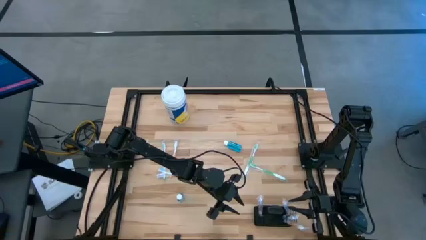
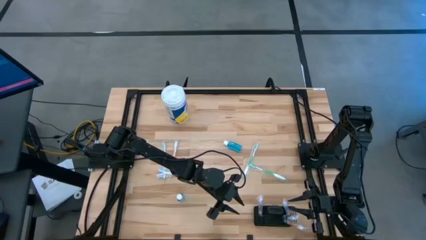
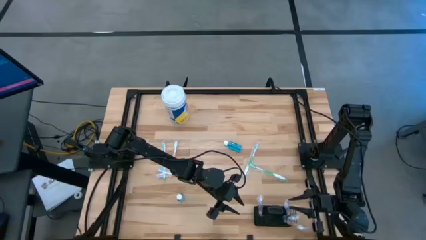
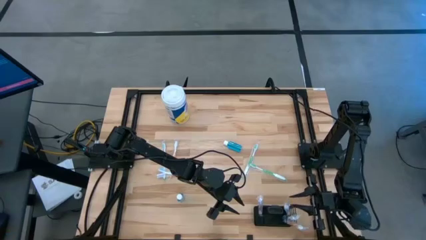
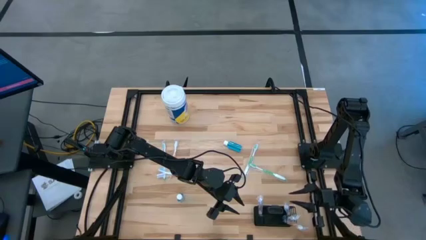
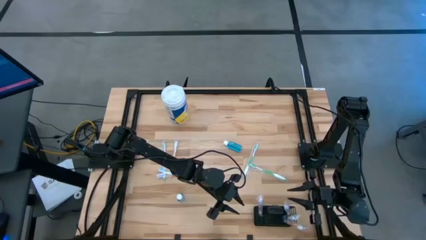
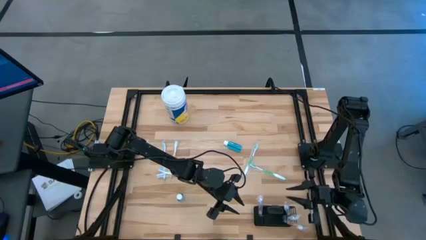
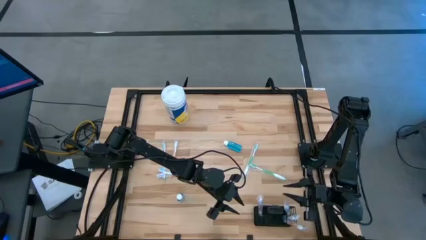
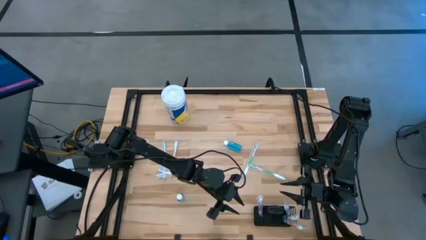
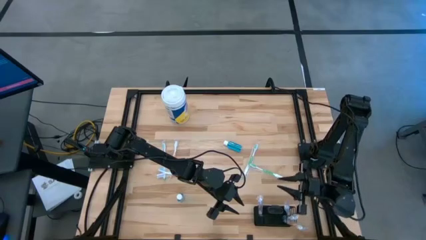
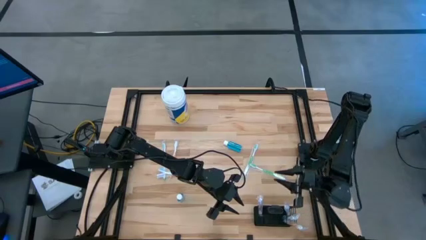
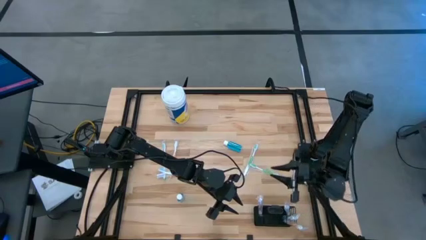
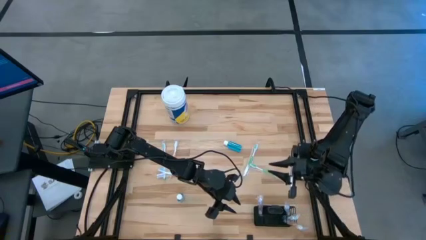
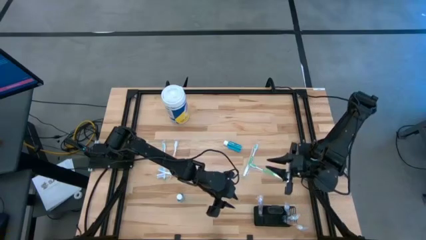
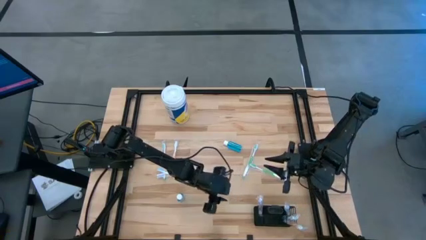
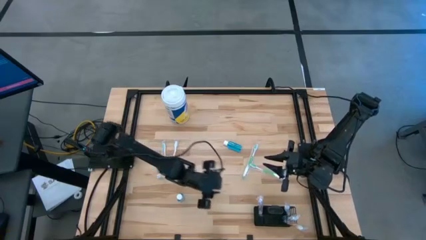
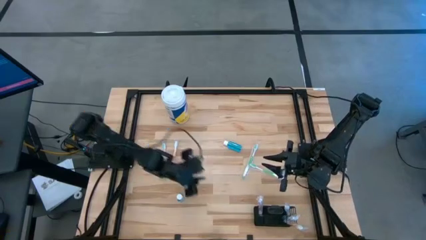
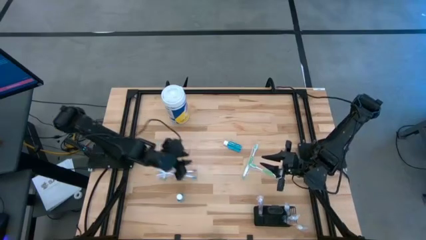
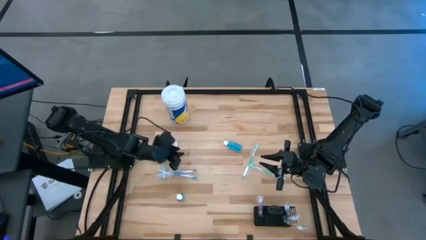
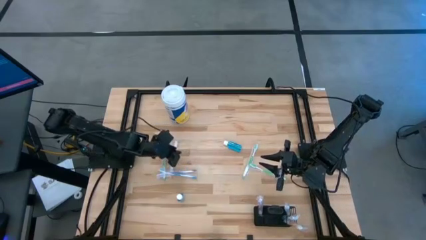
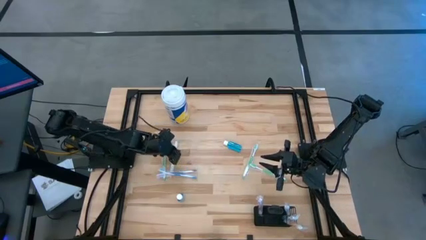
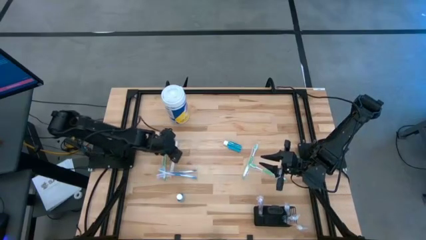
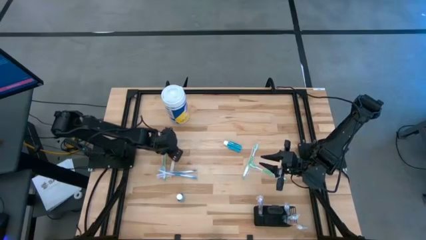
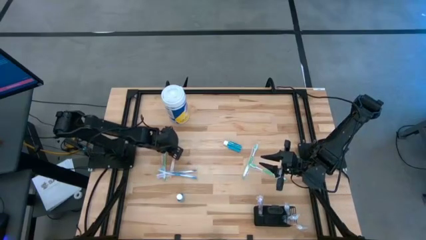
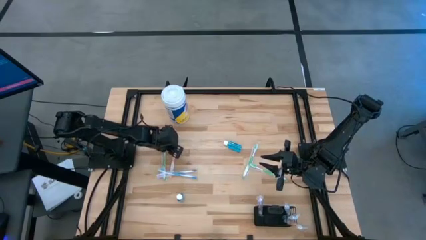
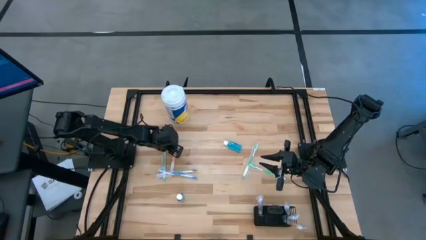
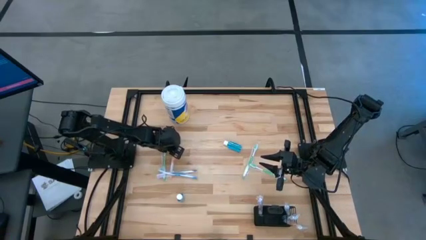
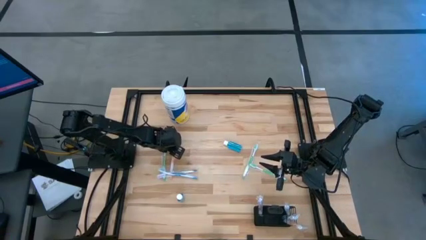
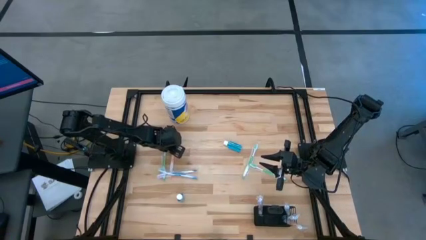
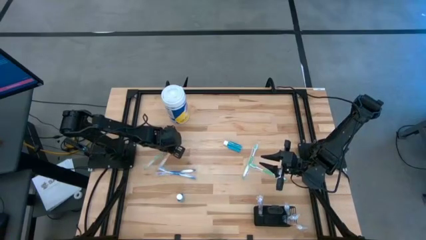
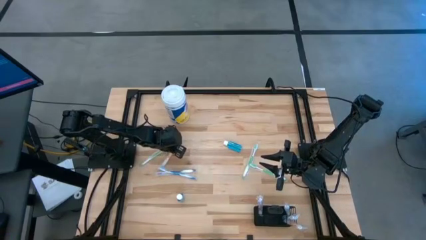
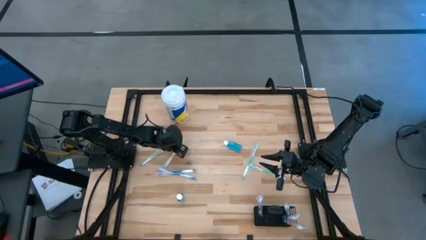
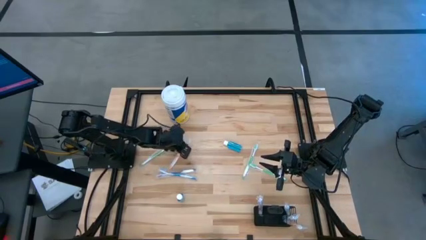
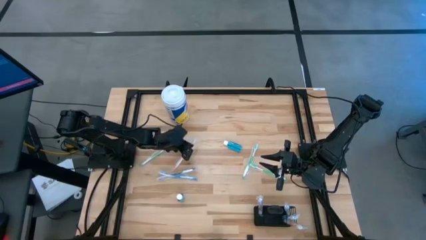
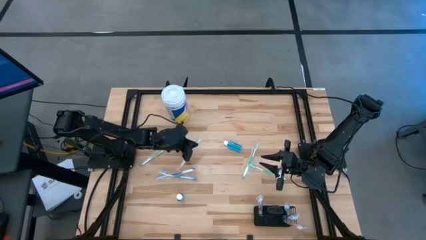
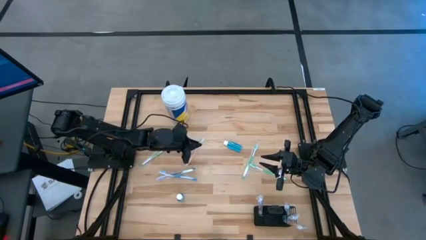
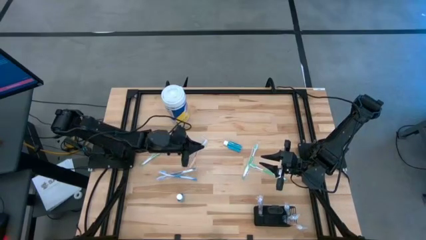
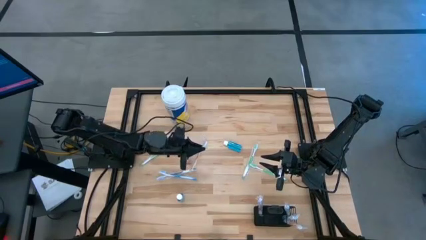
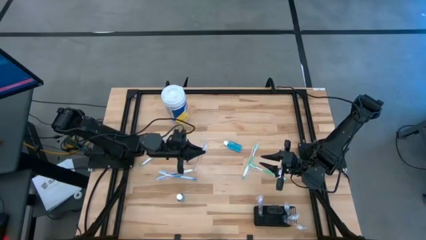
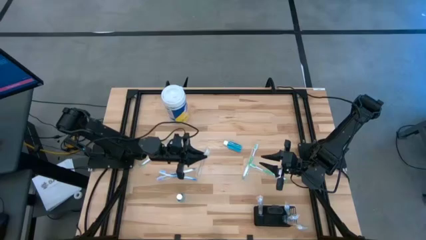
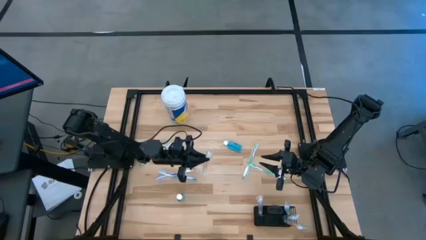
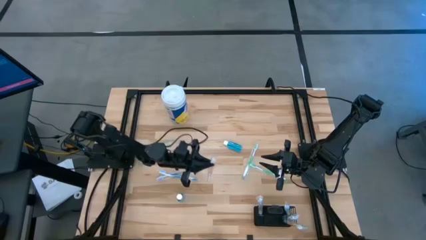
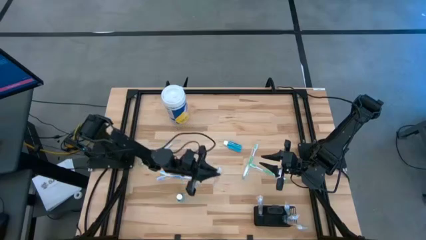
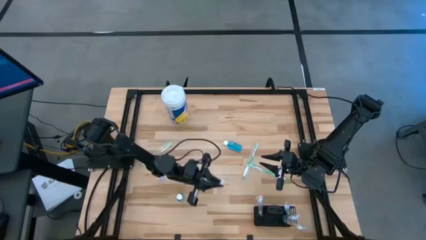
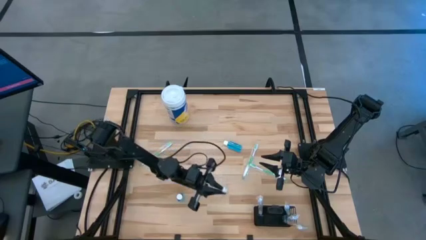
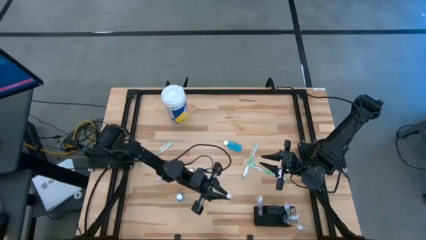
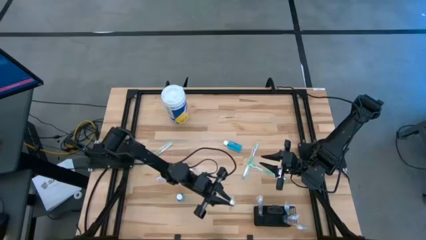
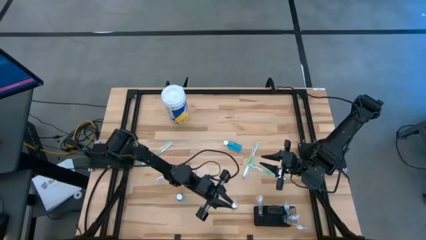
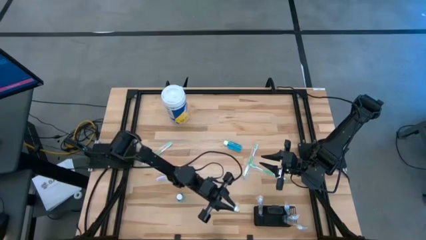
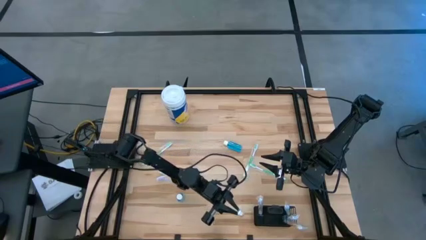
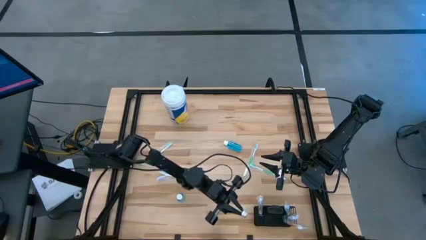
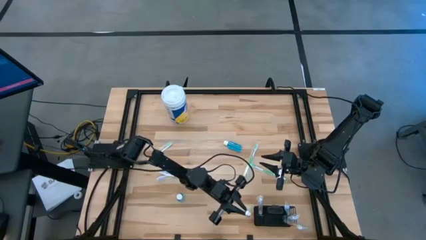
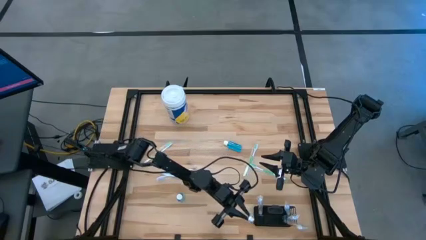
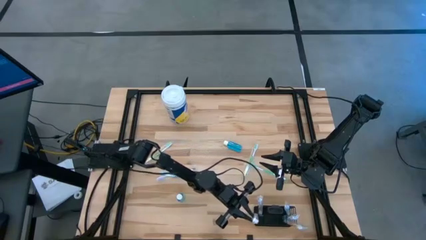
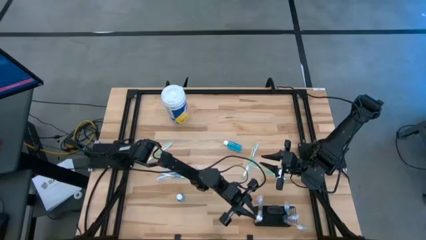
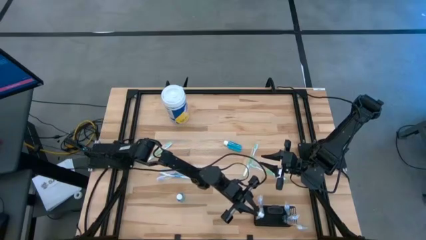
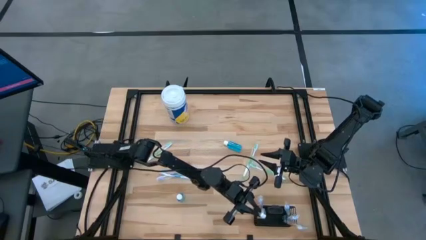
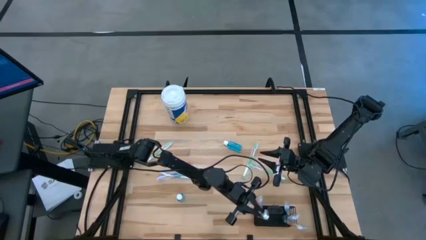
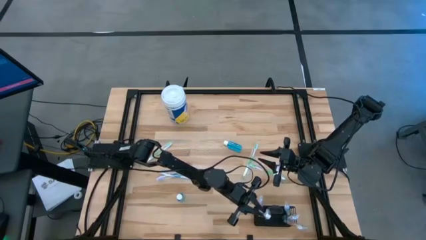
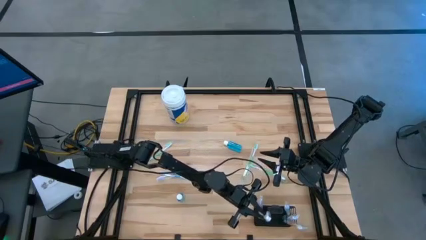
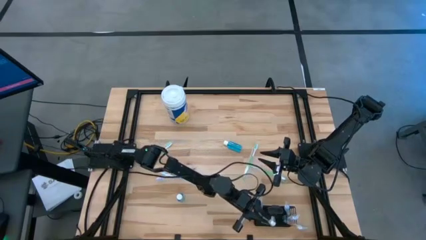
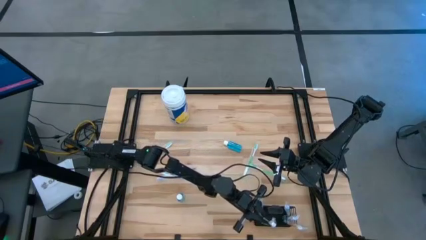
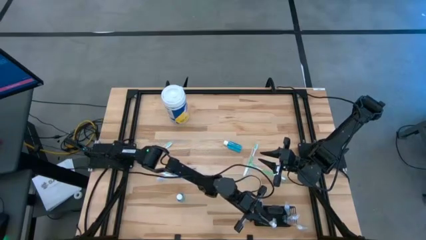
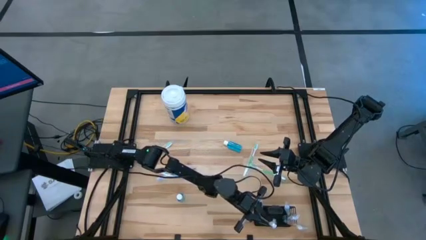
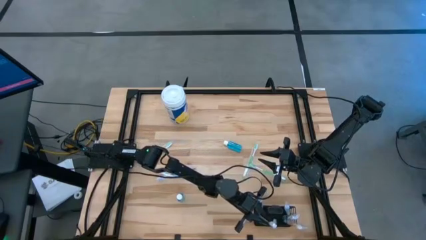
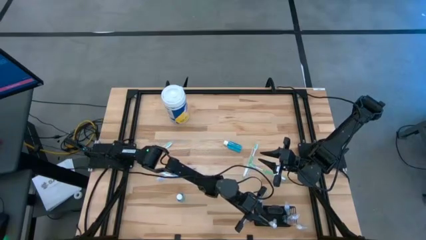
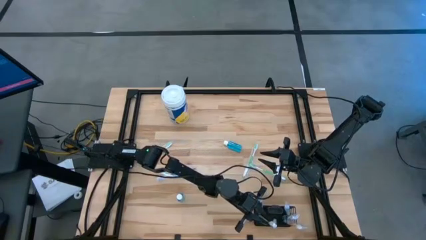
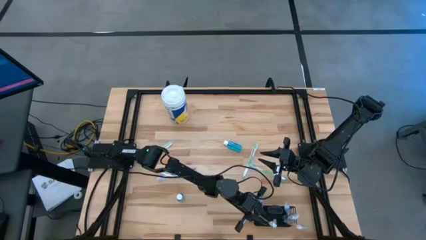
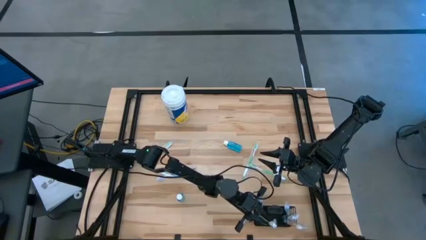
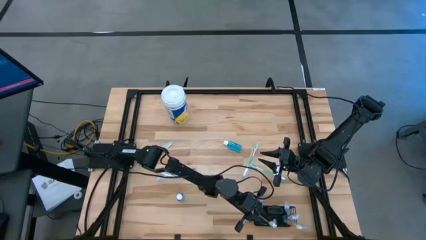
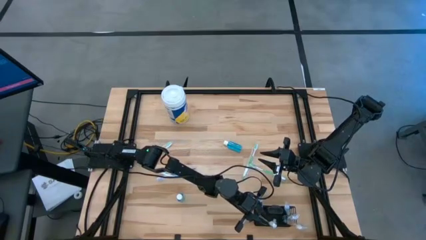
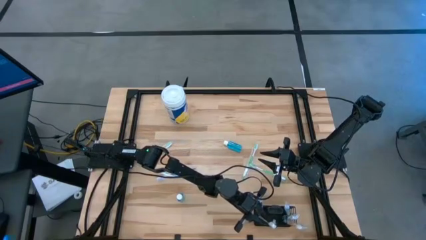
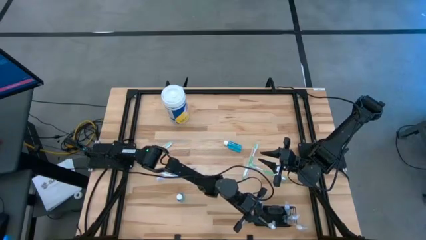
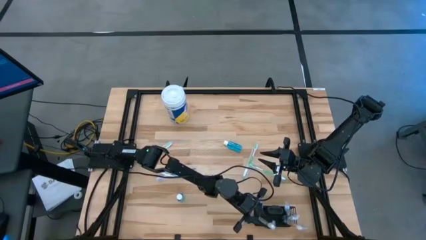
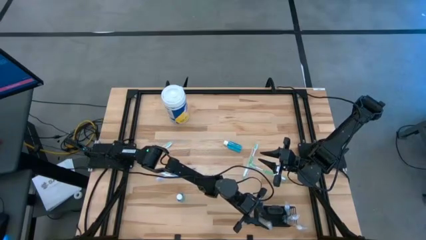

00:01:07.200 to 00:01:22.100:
Task: Pick & Place toothbrushing station
Put the orange toothbrush into the wire organizer
